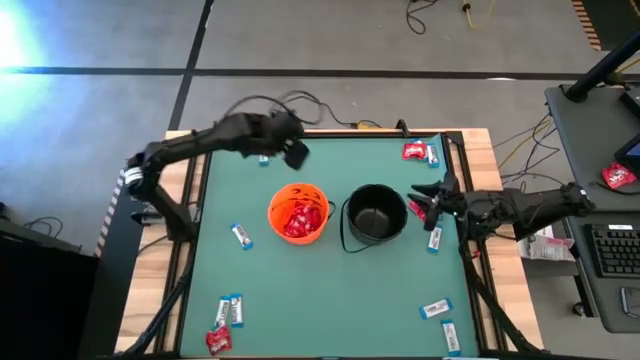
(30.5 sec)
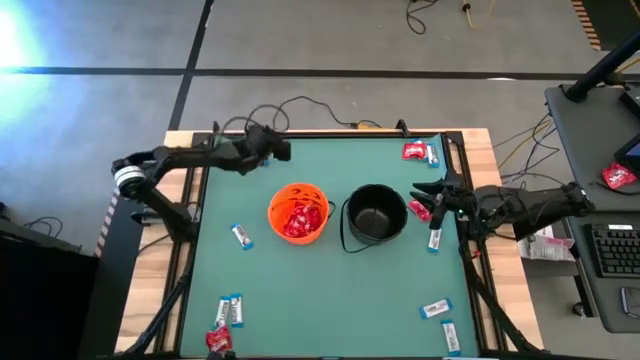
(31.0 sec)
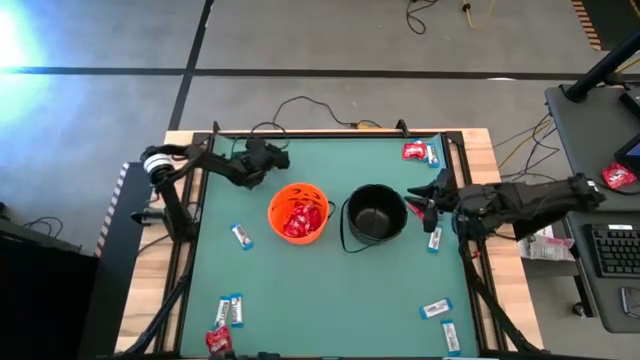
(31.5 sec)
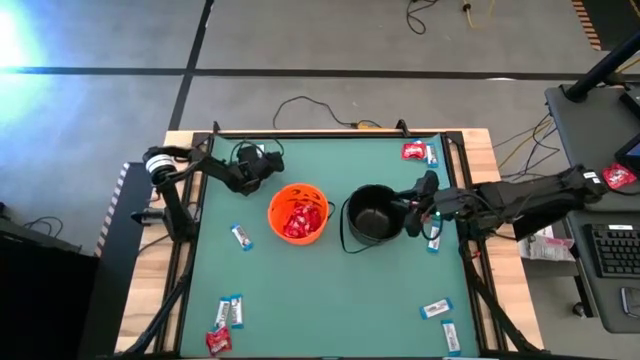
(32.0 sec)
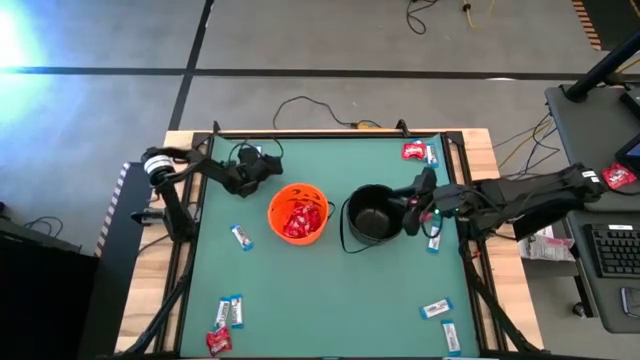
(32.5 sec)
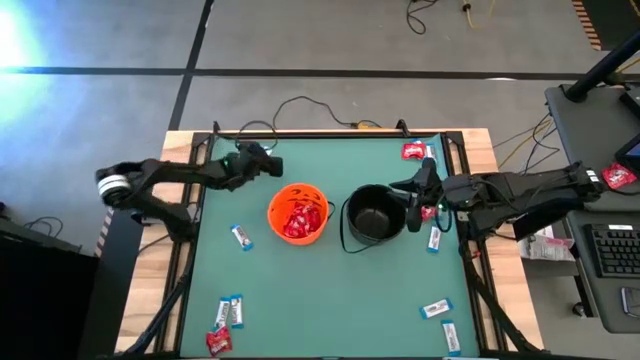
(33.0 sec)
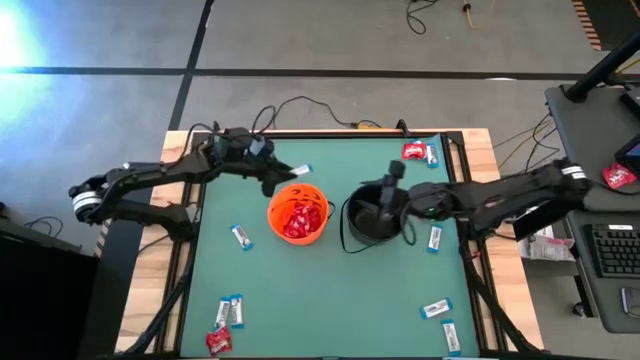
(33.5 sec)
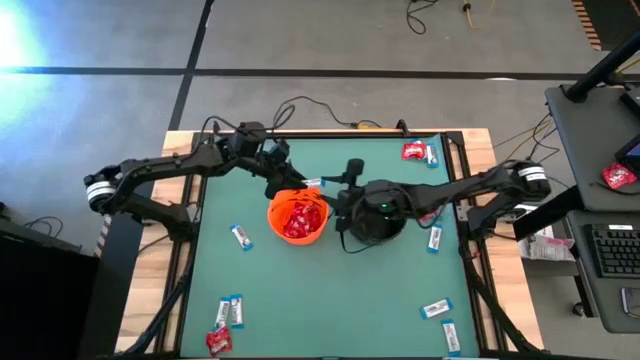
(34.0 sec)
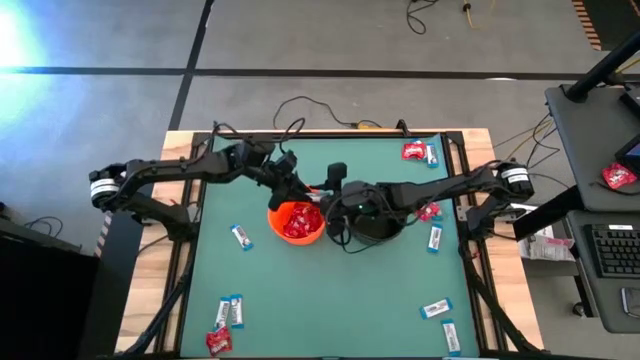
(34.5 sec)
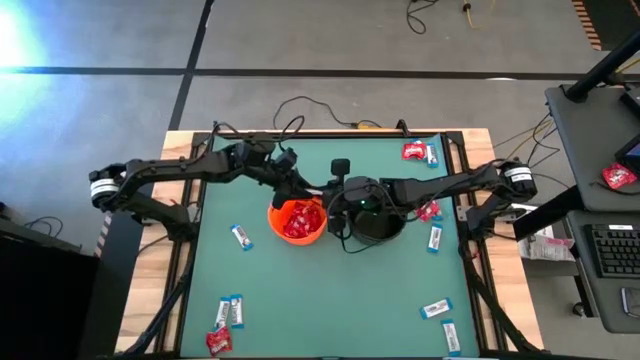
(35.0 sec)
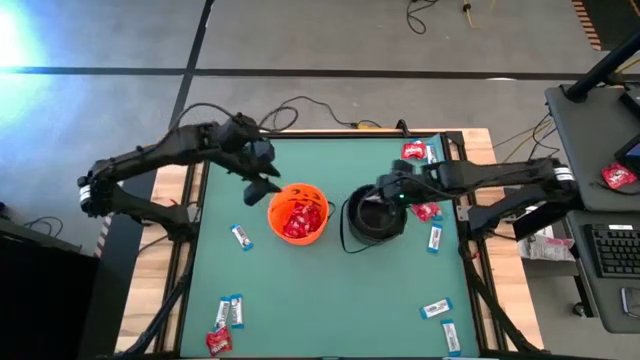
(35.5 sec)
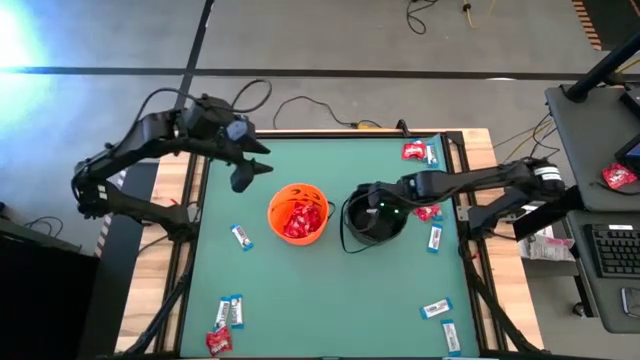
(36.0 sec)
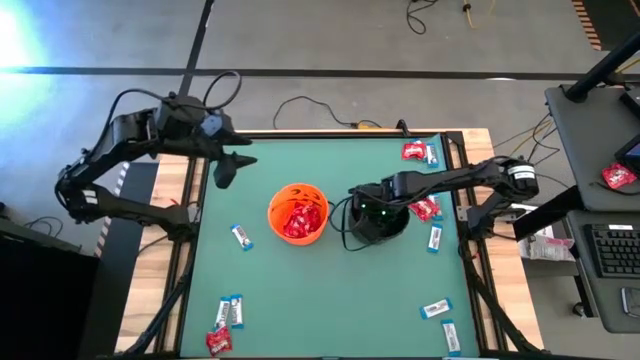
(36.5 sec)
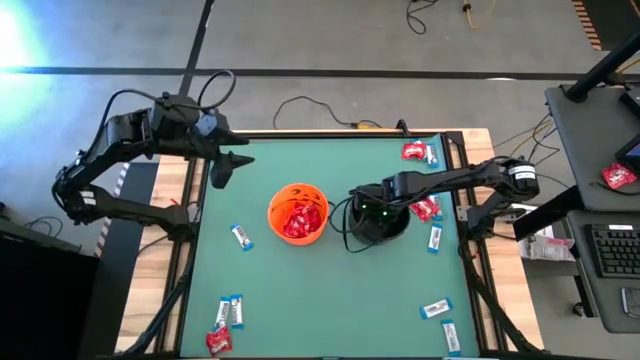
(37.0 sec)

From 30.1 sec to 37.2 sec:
Task: Sort candy by brand, put in halloween buckets
Put the white chocolate into the black bucket

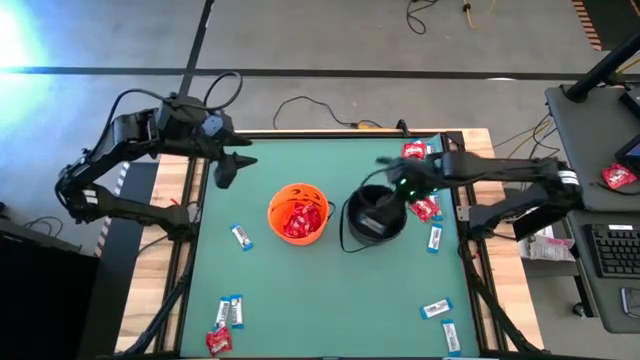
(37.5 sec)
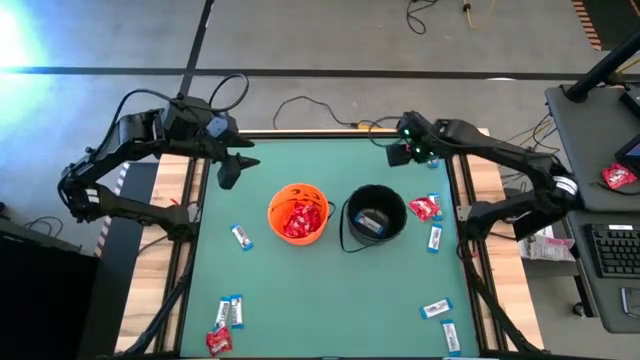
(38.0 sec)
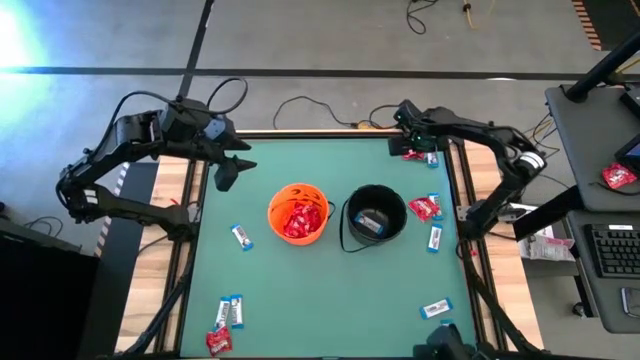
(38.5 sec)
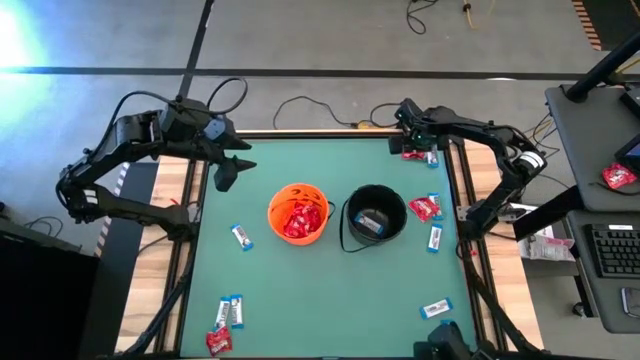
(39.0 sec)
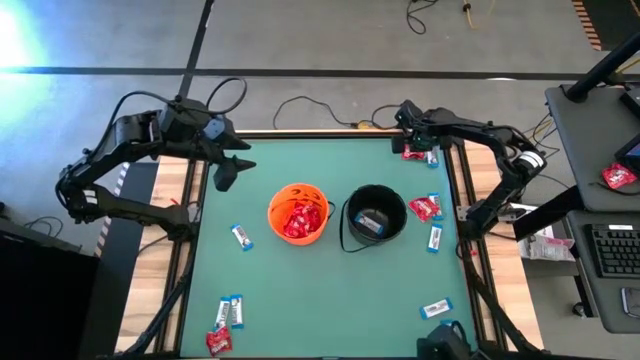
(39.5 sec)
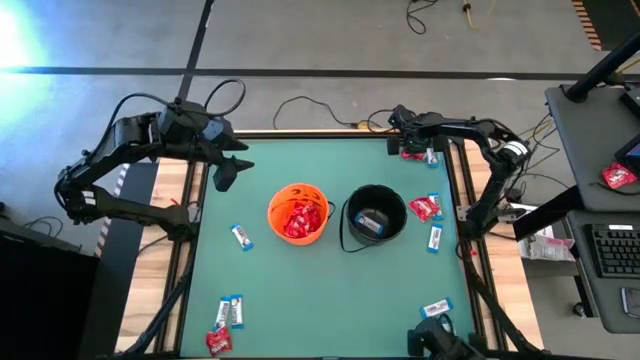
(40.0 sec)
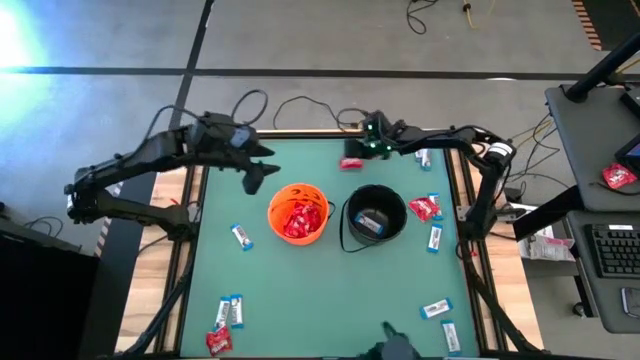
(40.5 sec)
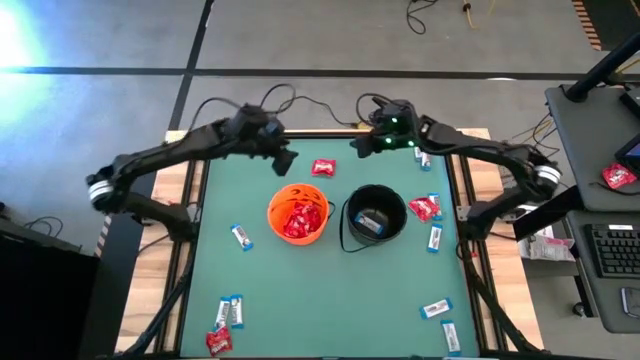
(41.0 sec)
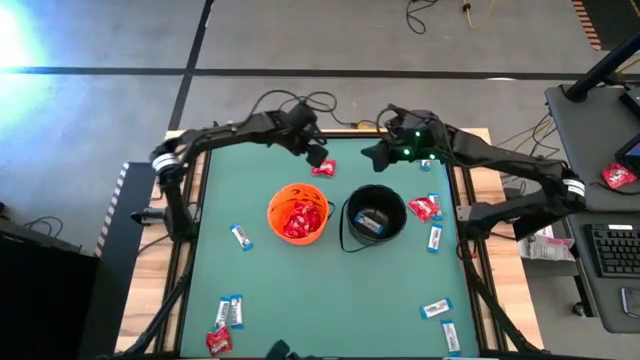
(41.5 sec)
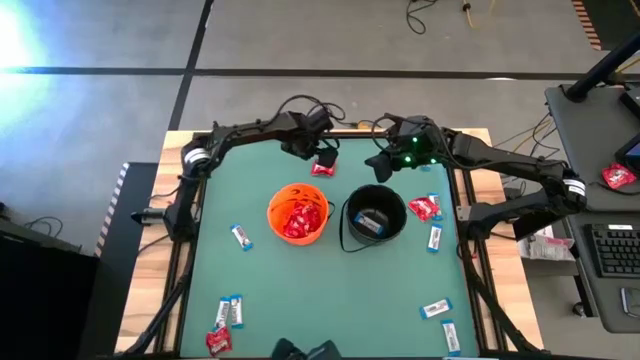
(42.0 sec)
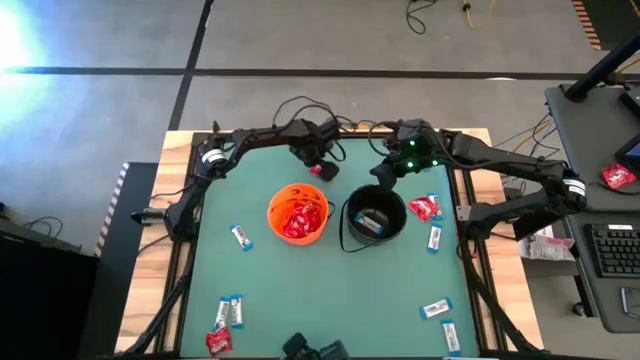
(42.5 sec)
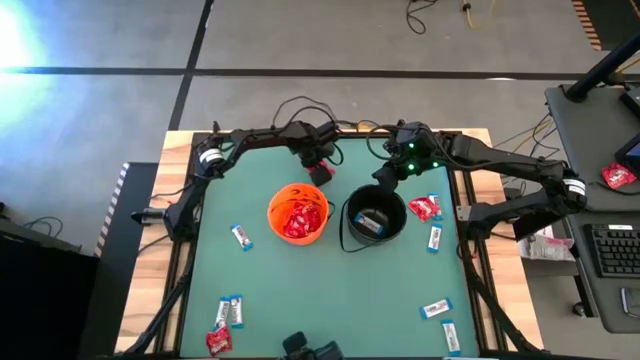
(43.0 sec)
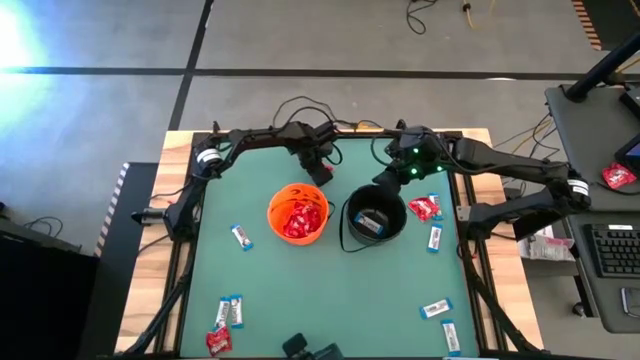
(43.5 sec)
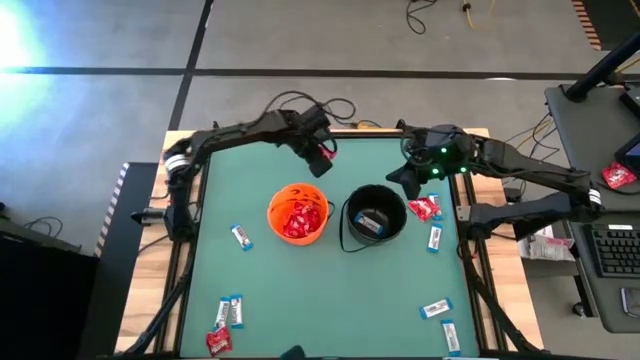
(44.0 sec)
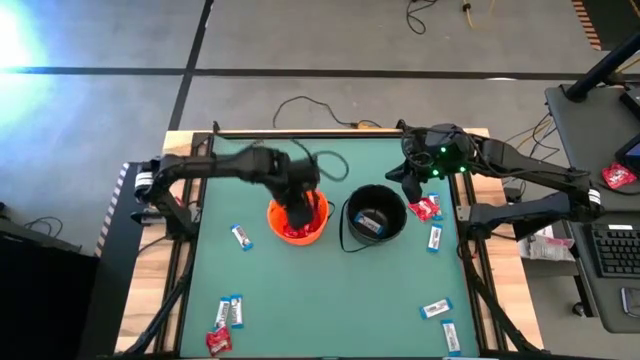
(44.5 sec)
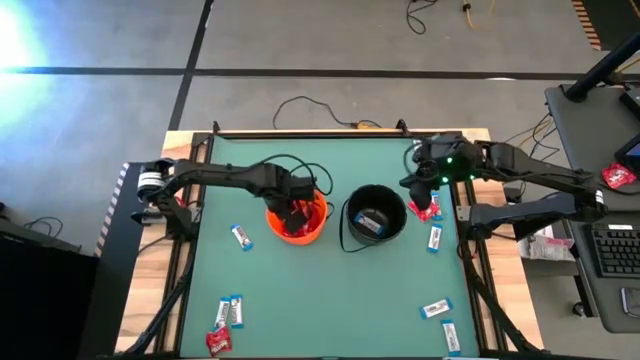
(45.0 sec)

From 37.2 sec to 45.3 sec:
Put the red candy into the orange bucket

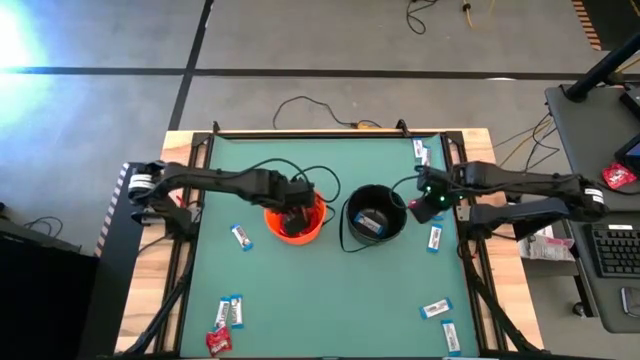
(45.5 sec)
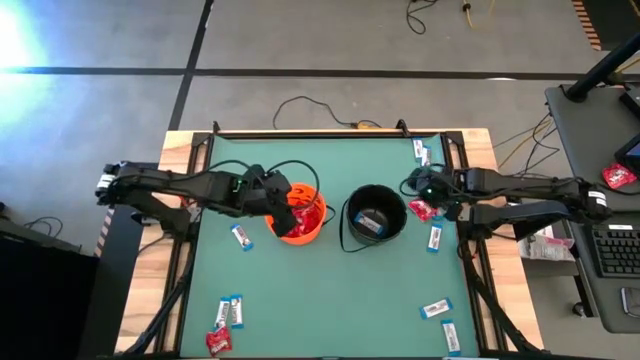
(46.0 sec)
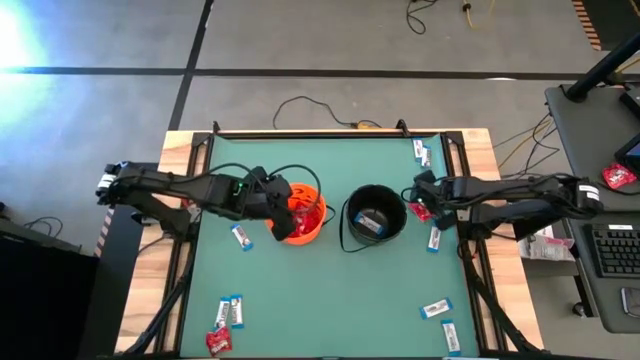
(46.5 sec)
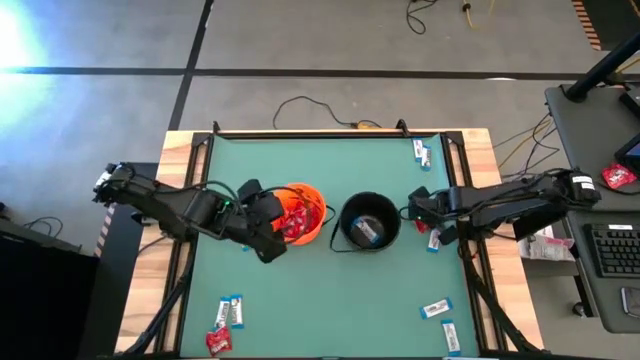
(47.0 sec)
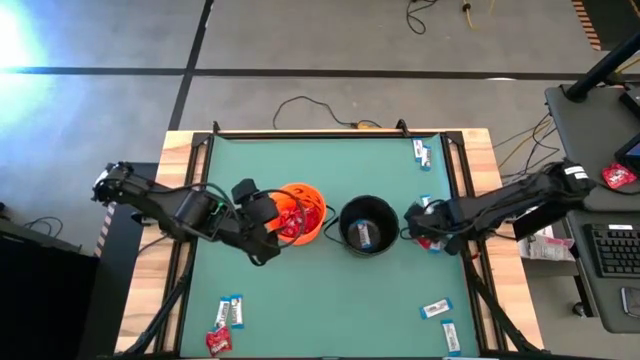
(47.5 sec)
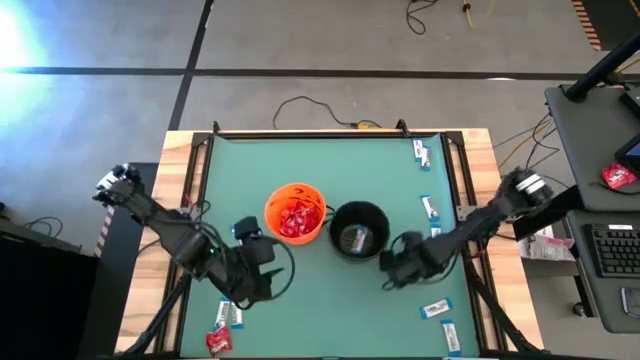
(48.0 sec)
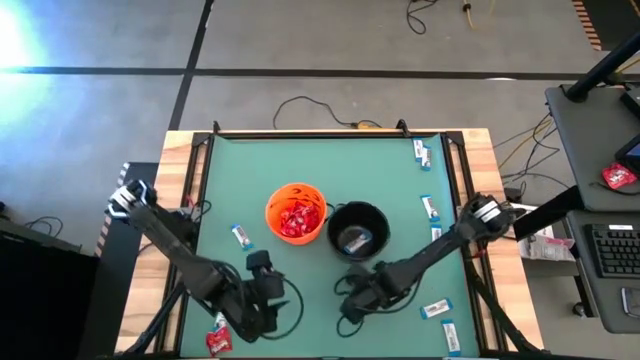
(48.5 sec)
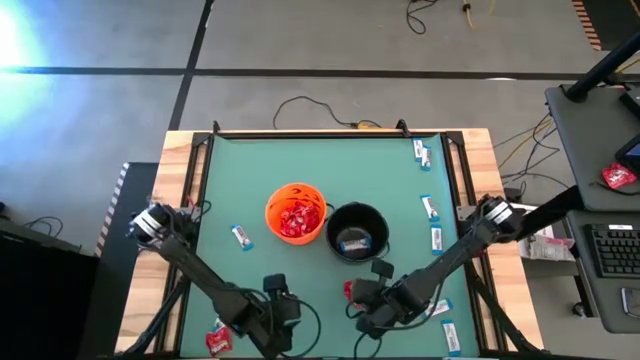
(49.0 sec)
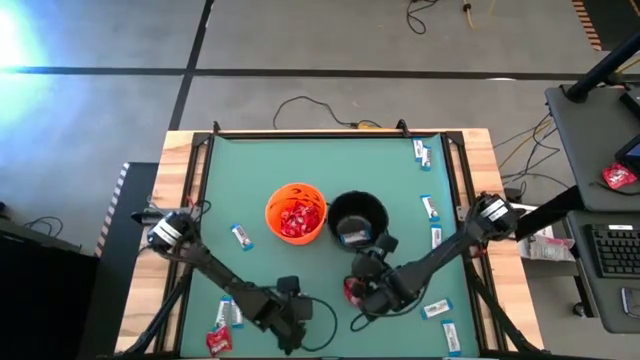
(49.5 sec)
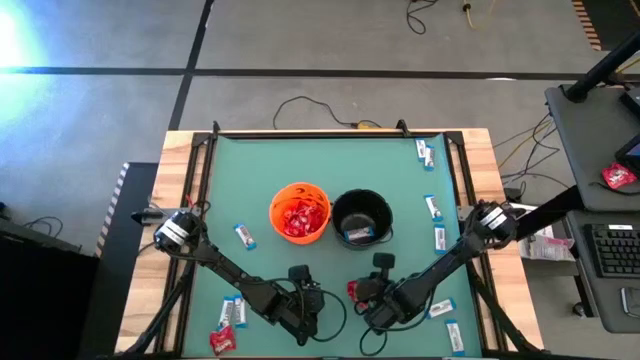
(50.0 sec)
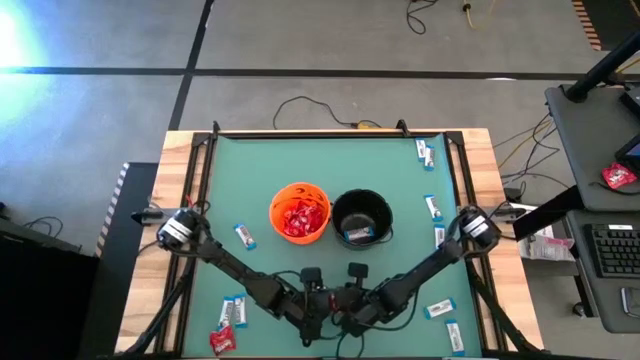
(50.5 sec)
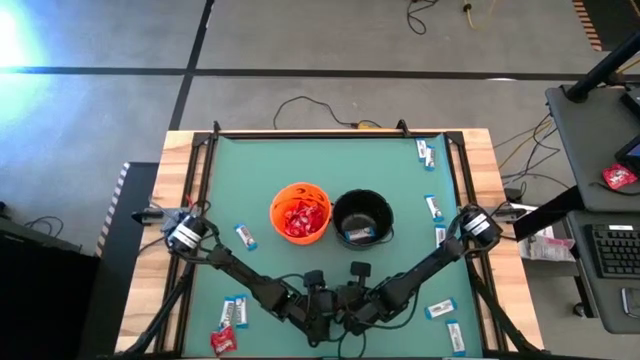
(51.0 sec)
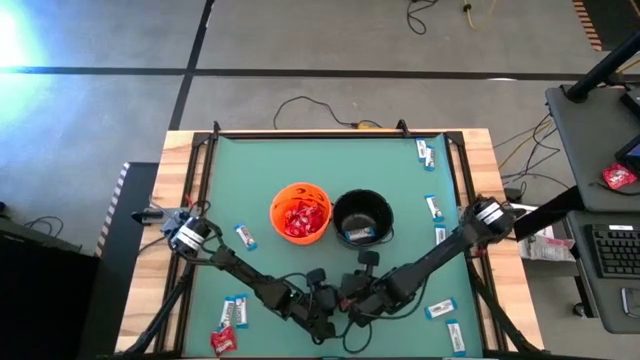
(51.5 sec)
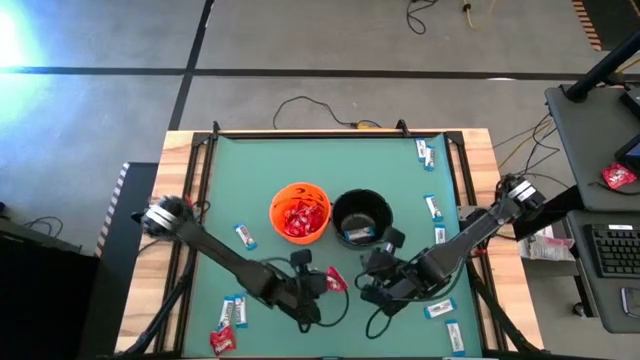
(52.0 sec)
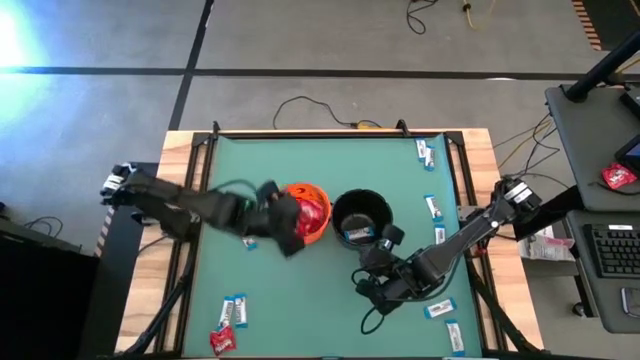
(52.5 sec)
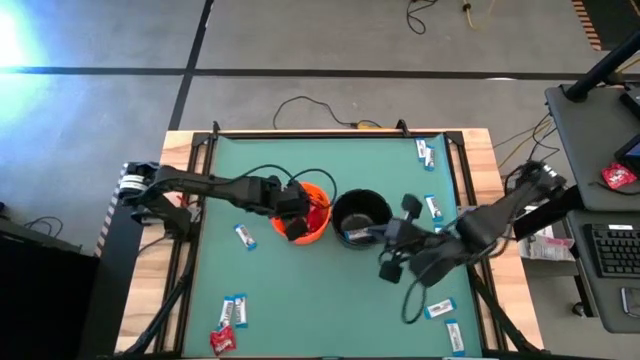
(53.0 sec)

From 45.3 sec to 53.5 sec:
Put the red candy into the orange bucket
